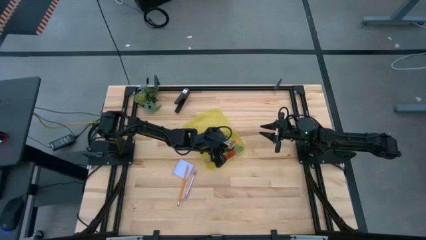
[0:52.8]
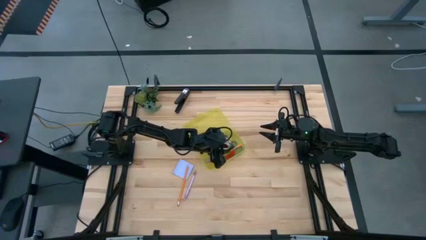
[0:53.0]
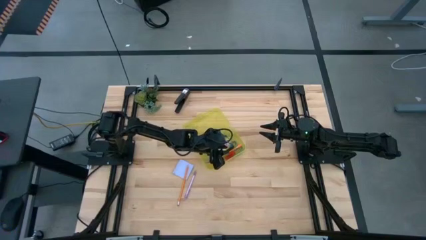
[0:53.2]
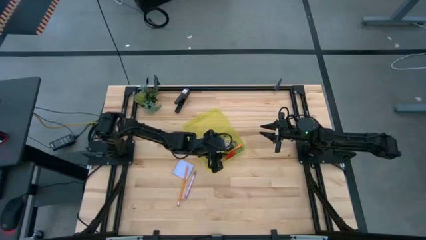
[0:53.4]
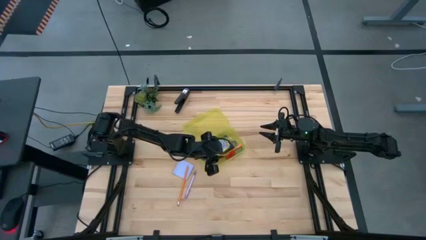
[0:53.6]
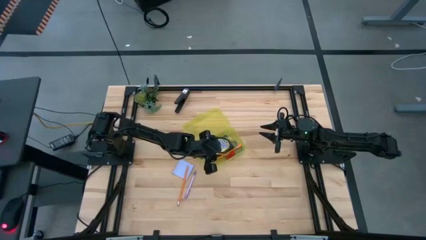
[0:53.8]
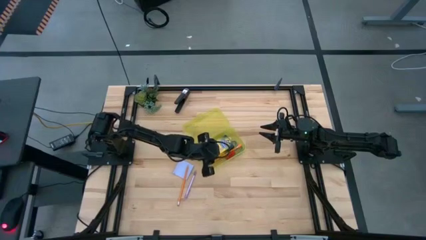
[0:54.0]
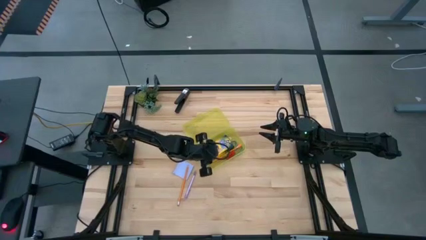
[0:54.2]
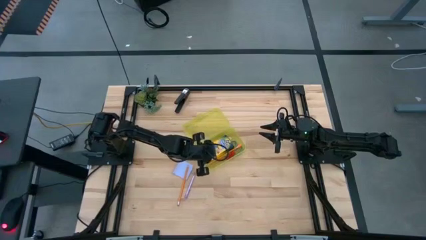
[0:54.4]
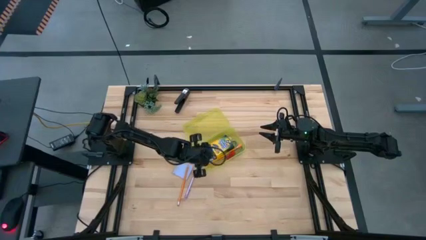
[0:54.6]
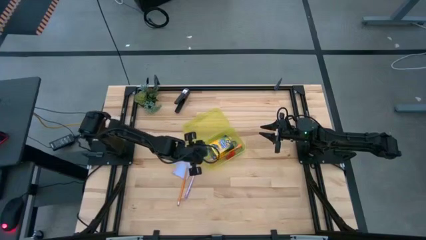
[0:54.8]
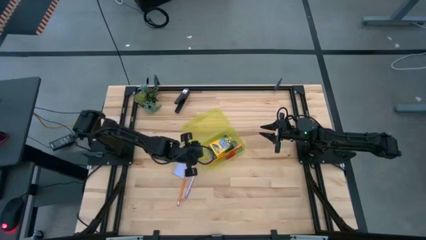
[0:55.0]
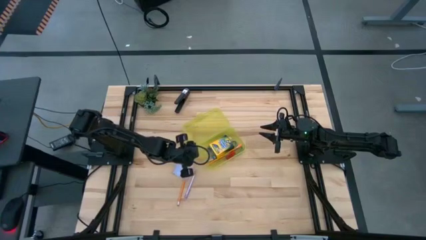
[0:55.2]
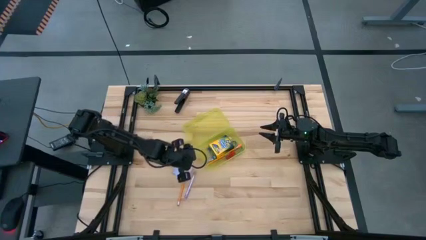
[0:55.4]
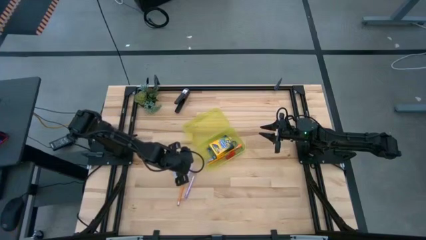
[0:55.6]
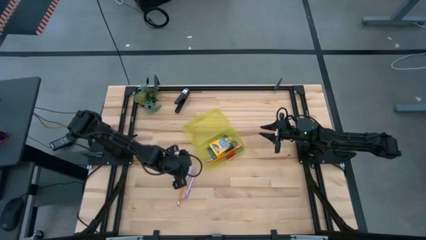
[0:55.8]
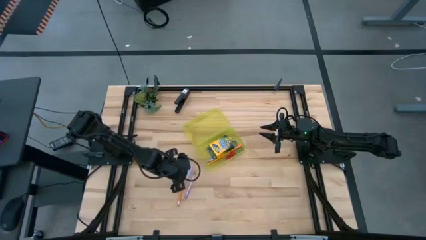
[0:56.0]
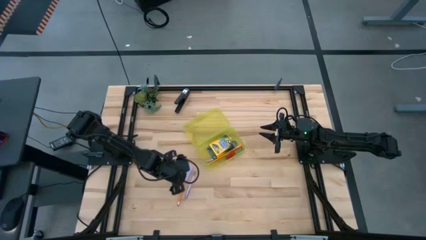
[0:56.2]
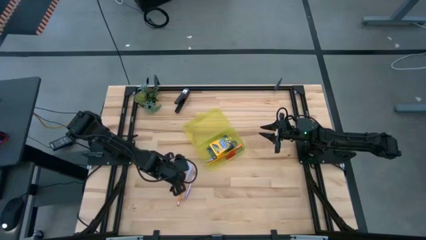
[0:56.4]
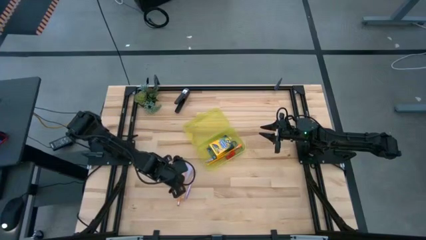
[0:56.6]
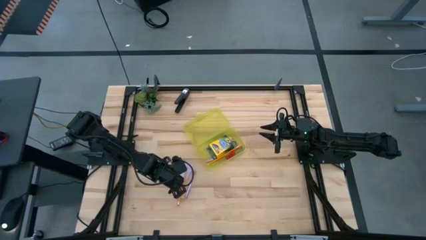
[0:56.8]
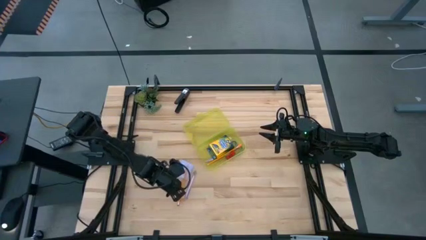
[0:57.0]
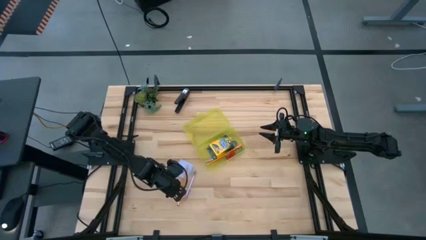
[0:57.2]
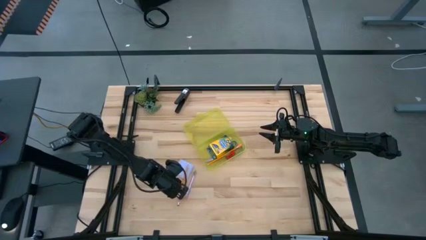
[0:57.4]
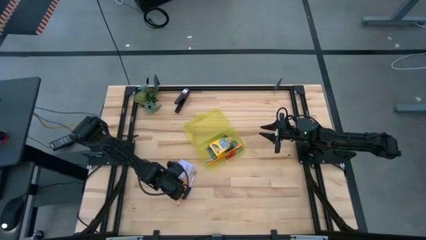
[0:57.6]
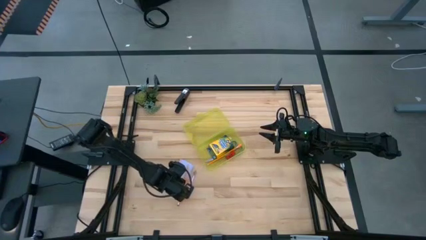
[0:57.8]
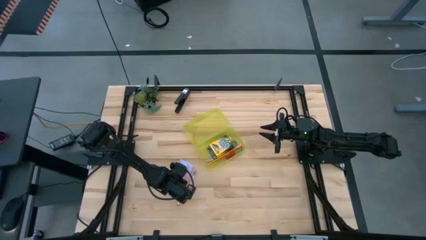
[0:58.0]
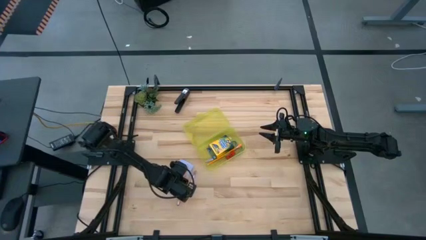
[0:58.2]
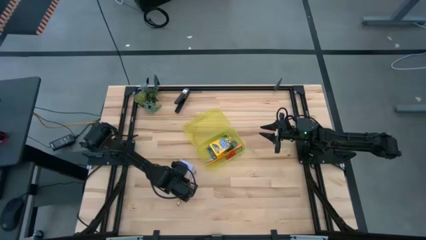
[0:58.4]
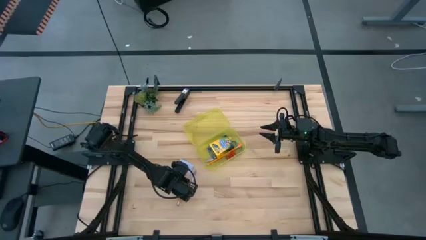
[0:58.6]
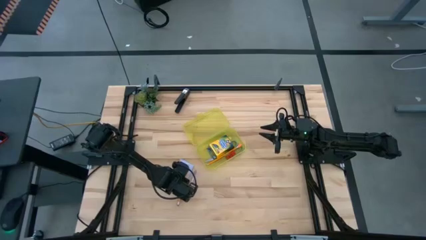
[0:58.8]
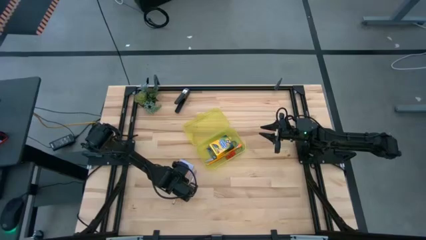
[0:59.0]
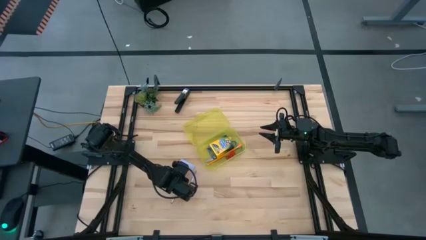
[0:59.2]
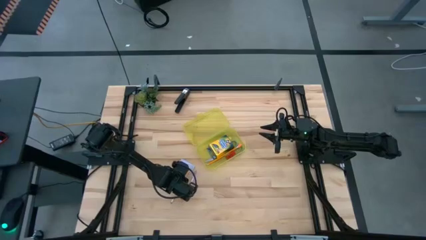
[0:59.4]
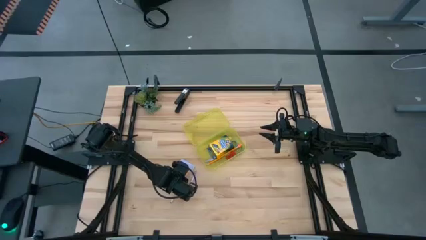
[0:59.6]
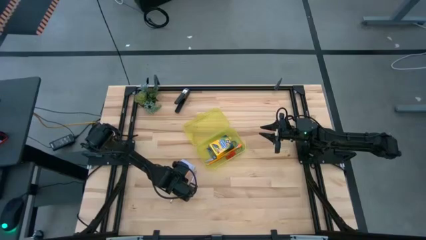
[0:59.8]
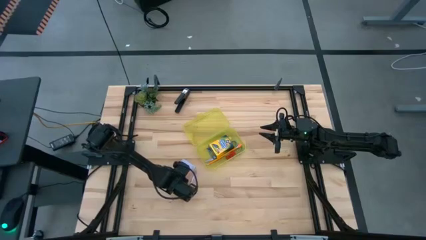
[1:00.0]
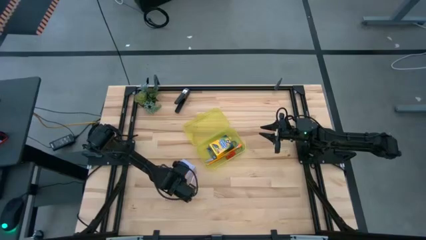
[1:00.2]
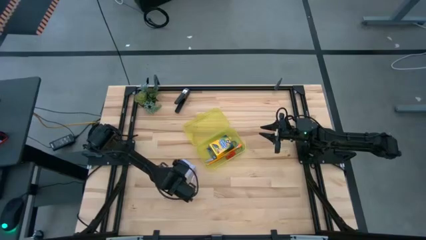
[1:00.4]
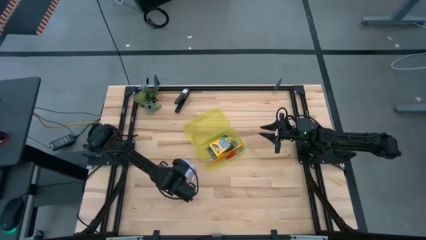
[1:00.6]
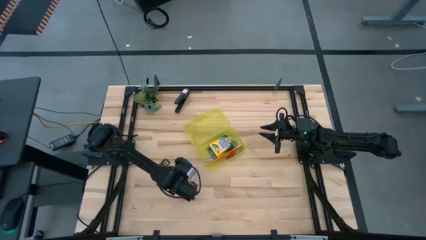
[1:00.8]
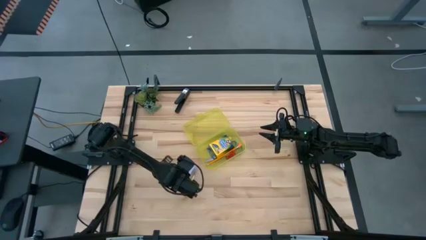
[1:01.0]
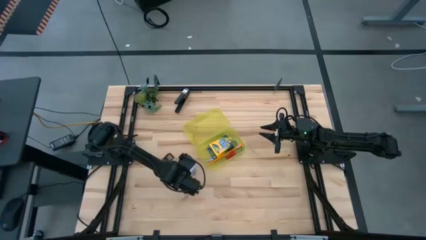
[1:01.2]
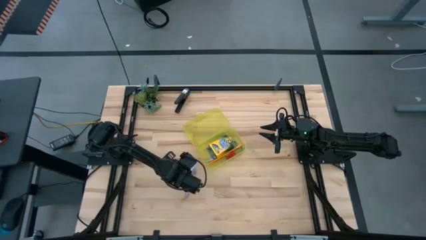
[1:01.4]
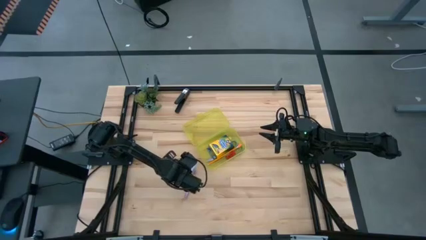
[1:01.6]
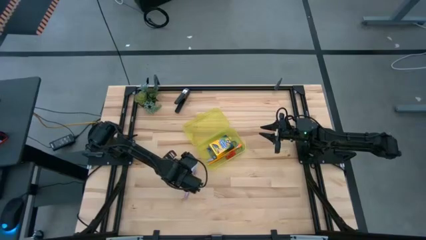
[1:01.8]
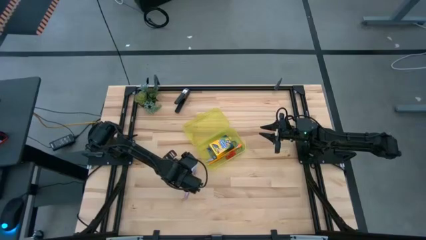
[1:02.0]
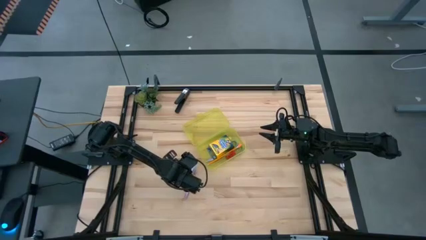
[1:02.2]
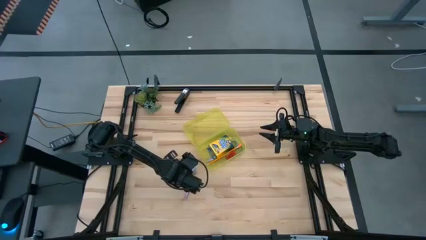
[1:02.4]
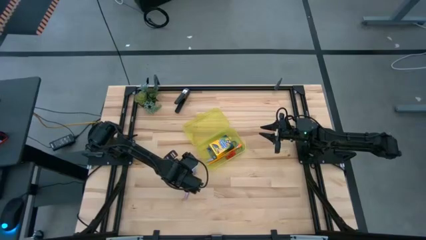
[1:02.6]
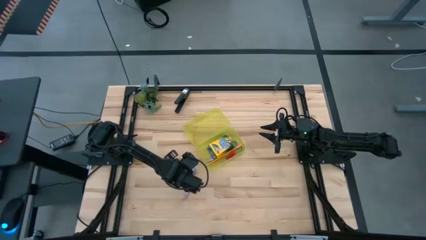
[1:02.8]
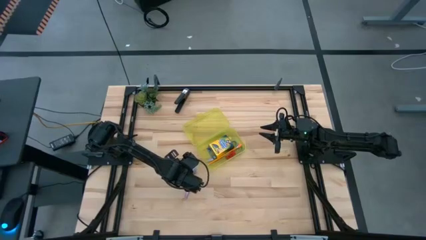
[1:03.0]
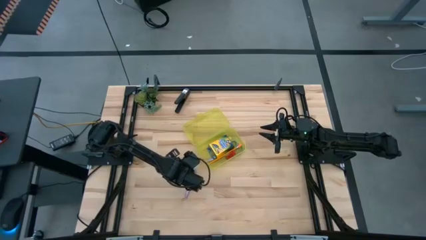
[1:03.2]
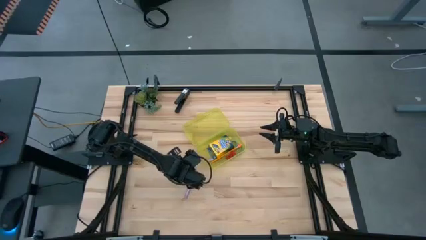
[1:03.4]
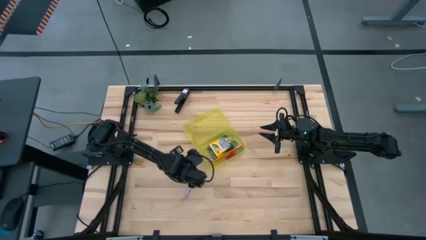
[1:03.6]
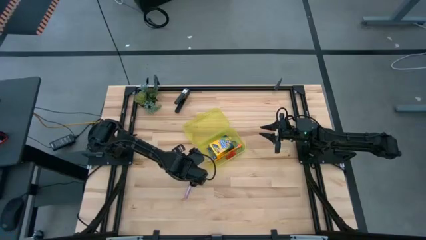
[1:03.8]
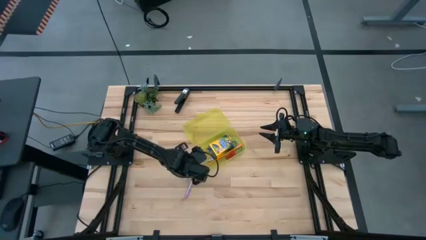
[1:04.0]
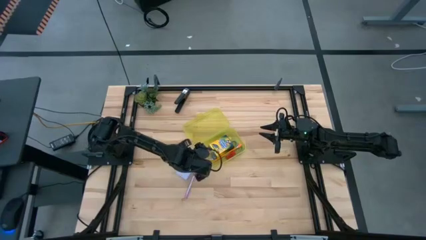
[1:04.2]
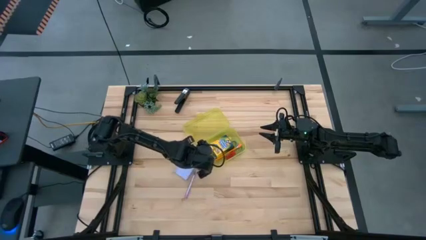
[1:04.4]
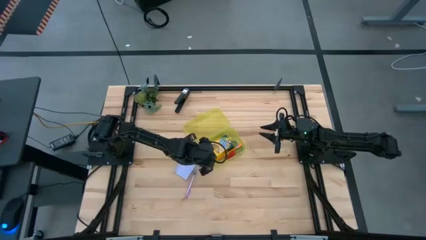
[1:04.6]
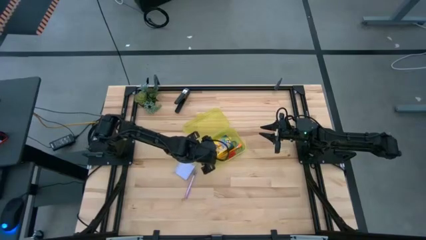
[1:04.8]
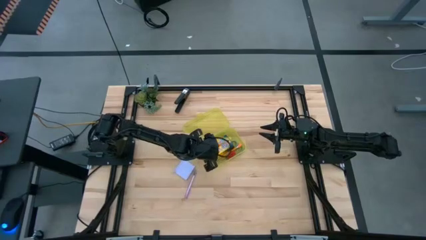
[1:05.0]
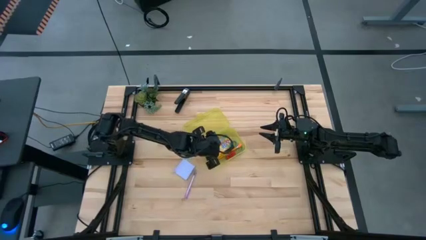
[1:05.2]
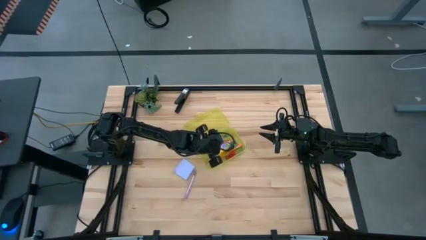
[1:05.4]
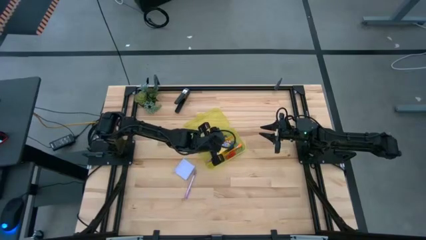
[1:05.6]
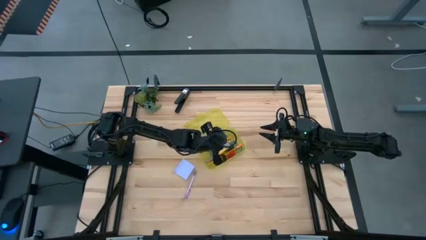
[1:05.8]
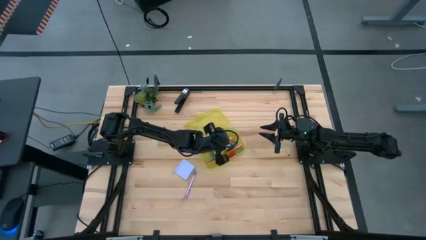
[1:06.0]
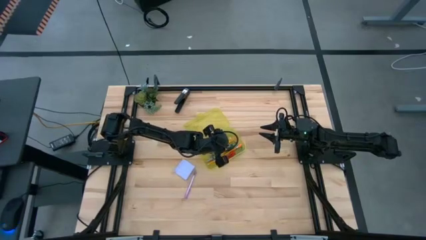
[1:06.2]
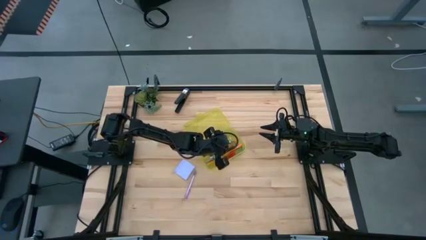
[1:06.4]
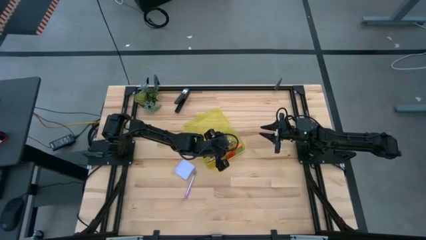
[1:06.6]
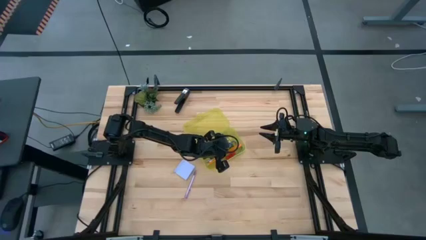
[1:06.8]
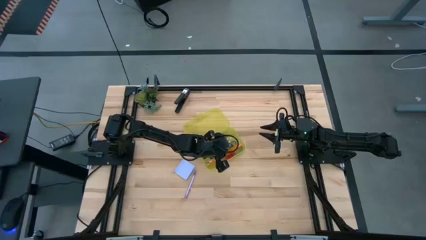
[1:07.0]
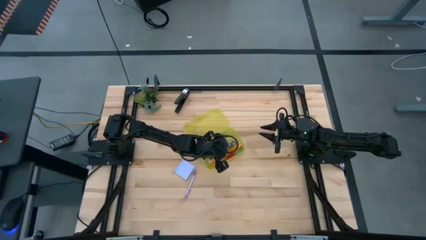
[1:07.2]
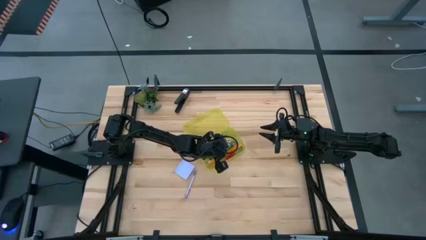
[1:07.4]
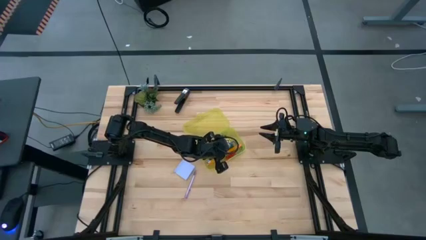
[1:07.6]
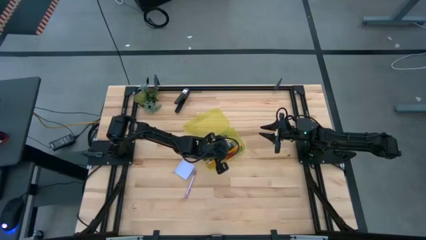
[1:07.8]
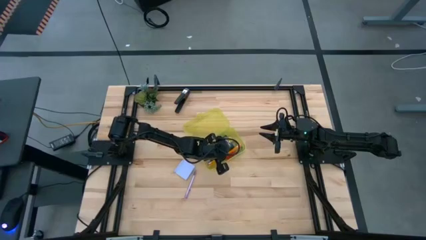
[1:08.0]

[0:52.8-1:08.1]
Task: Pack school essentials
Put the orange pencil into the yellow supply box

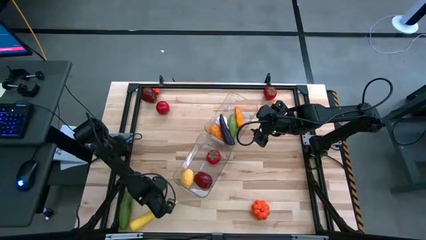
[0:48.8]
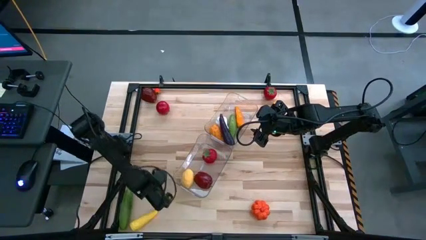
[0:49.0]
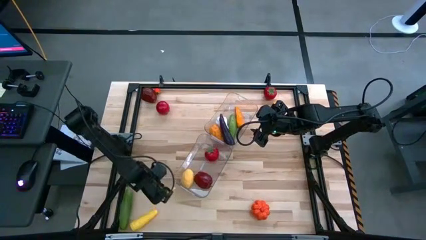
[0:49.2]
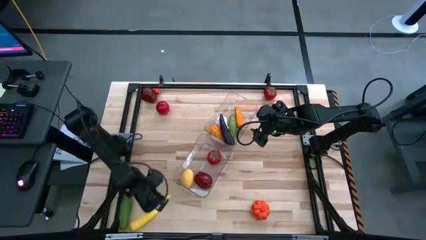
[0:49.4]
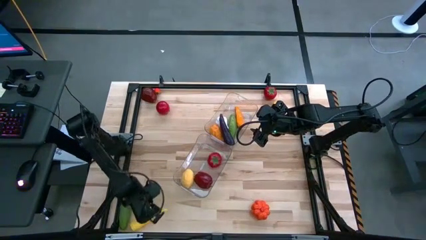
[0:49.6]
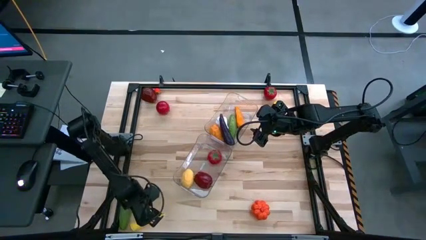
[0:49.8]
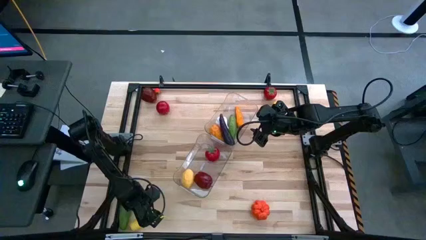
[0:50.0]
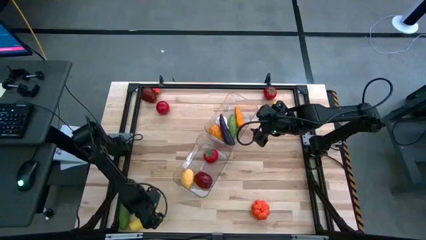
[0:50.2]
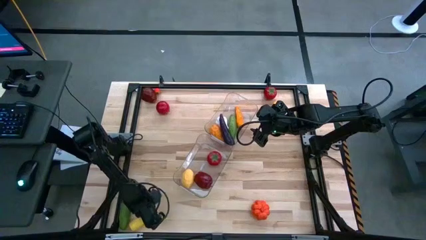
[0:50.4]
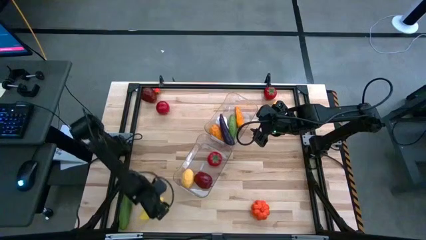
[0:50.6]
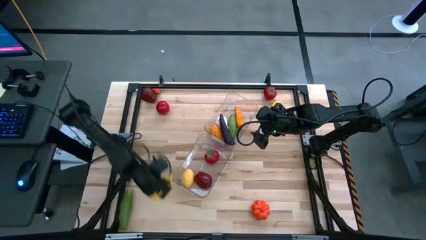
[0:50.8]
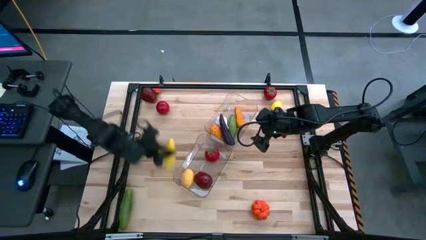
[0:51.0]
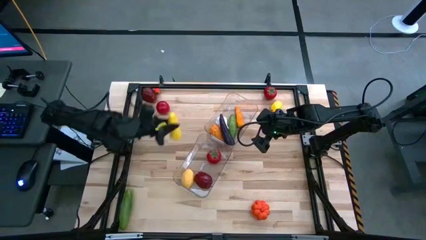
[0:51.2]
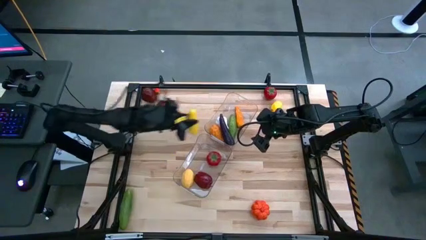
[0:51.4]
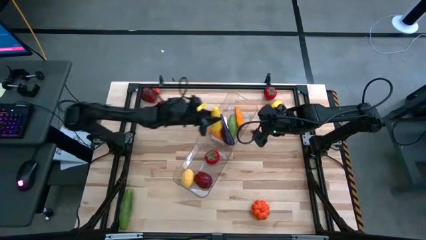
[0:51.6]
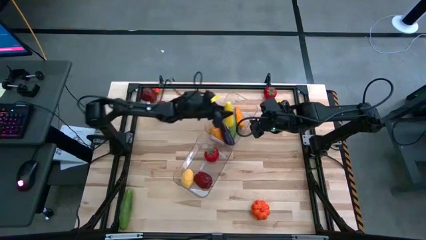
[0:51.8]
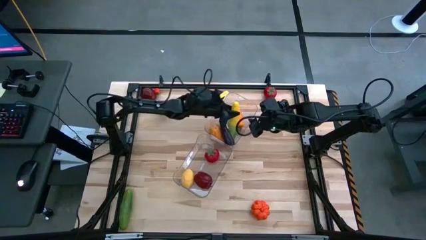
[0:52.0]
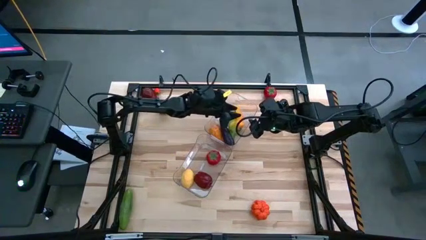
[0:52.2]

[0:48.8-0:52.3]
Task: Sort produce into baskets
Put the yellow corn into the top transparent bin
